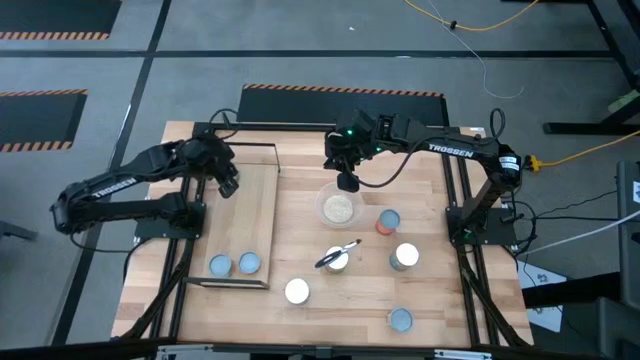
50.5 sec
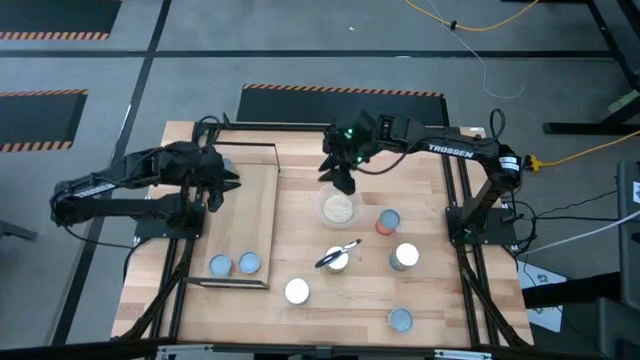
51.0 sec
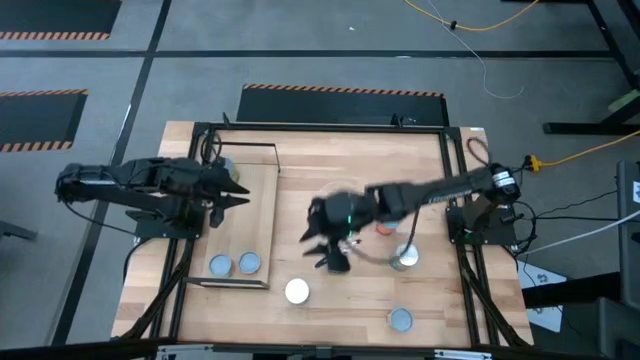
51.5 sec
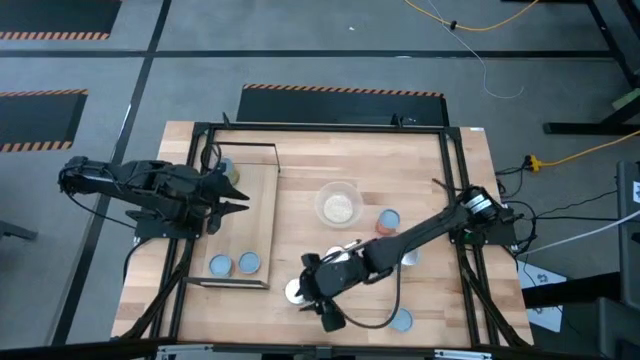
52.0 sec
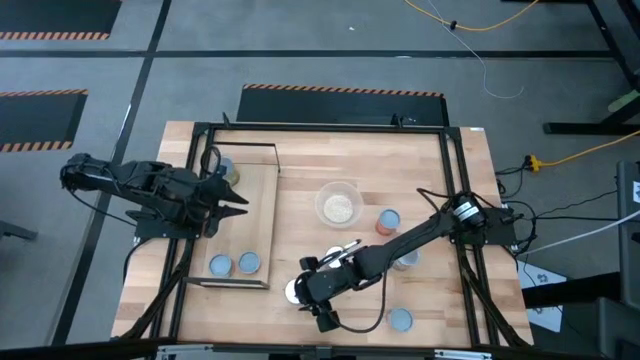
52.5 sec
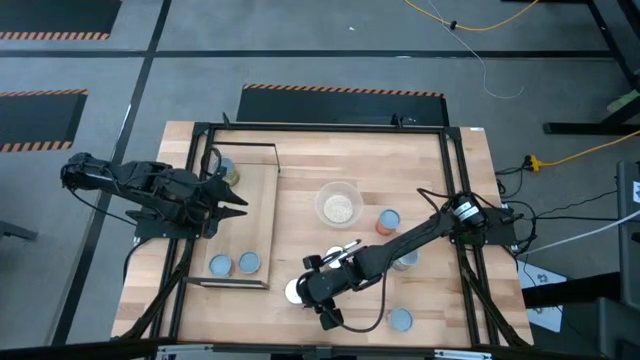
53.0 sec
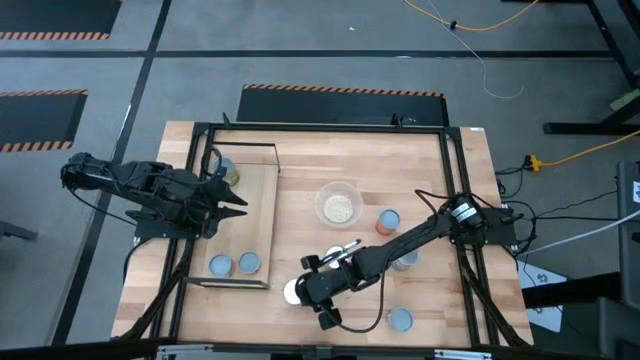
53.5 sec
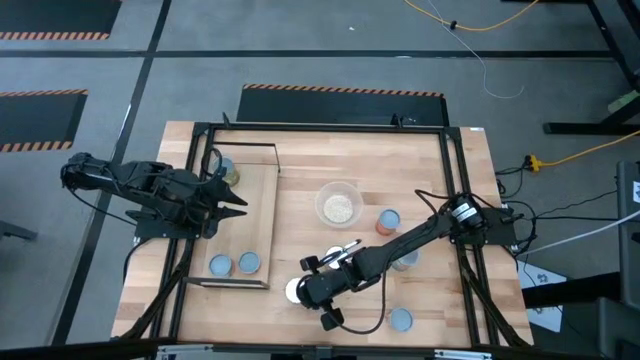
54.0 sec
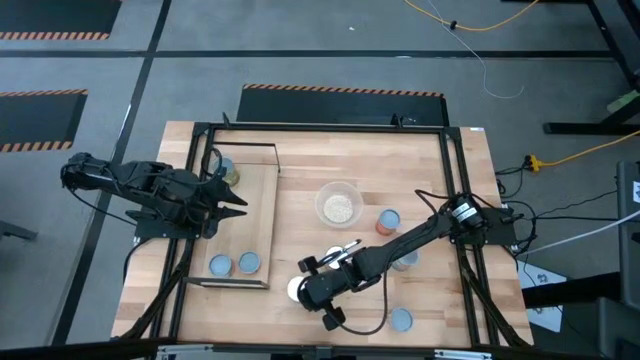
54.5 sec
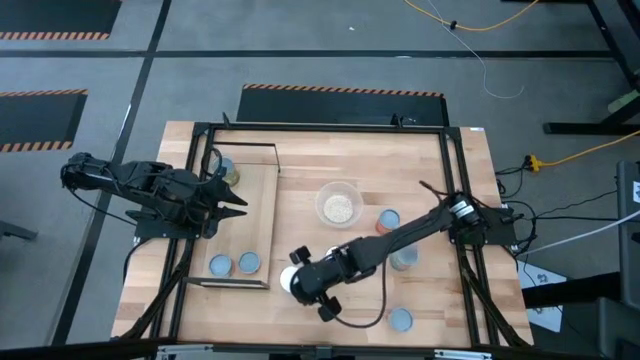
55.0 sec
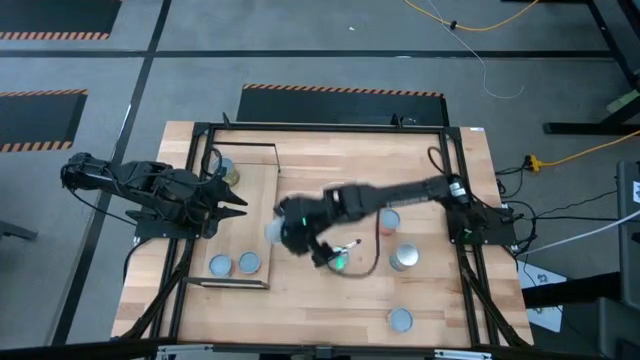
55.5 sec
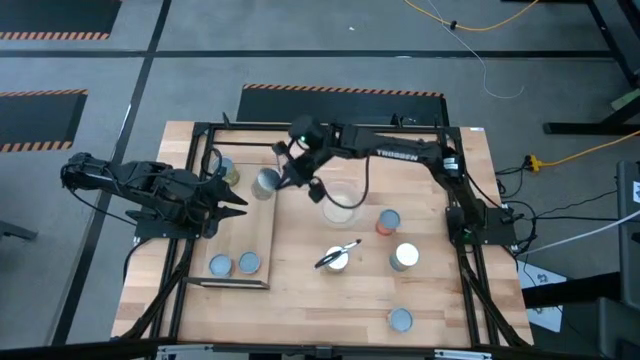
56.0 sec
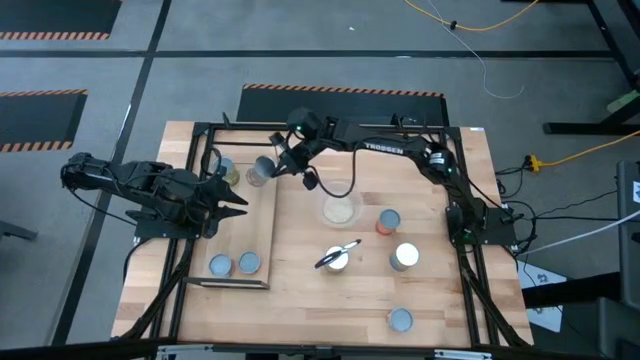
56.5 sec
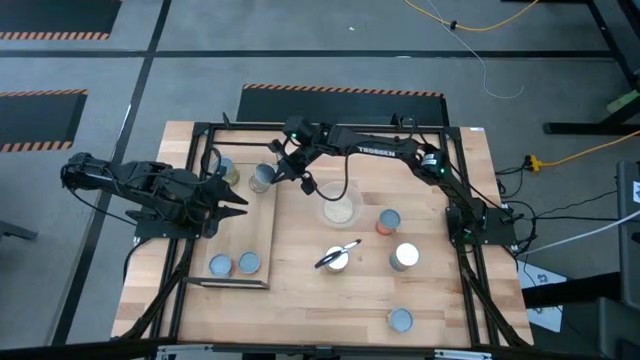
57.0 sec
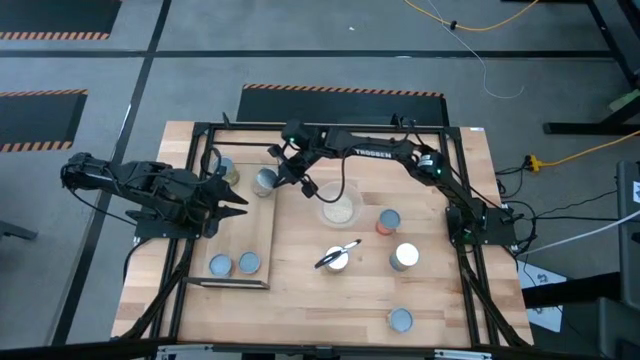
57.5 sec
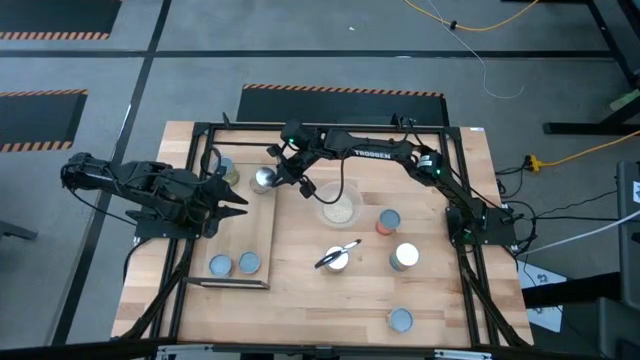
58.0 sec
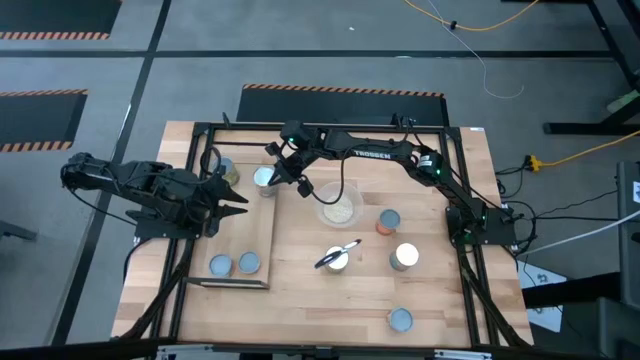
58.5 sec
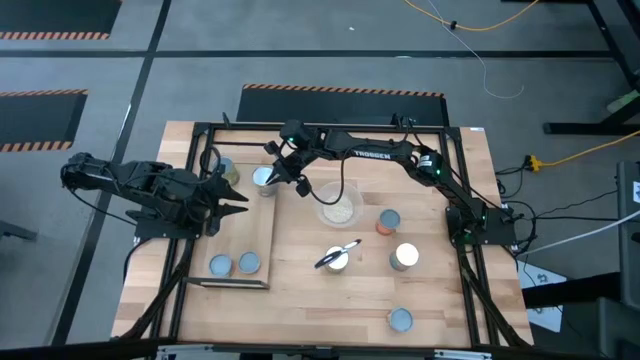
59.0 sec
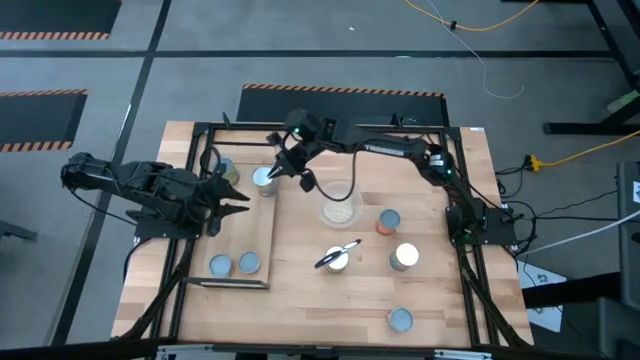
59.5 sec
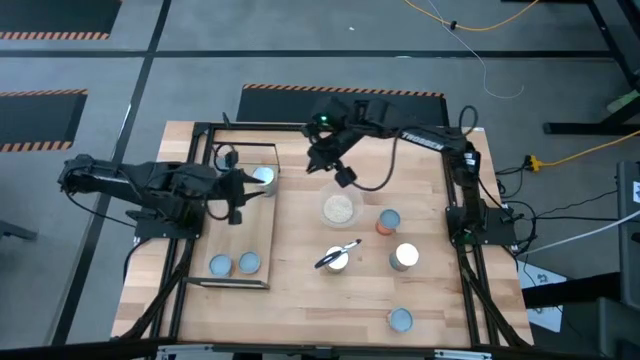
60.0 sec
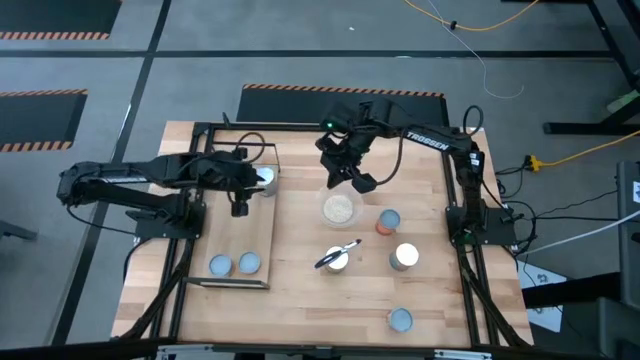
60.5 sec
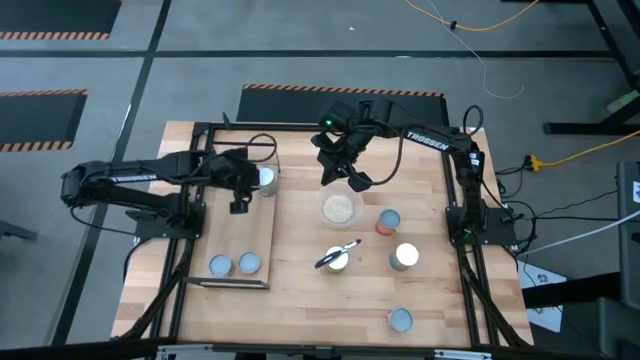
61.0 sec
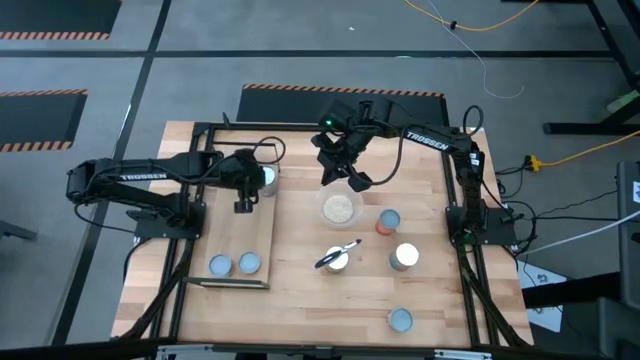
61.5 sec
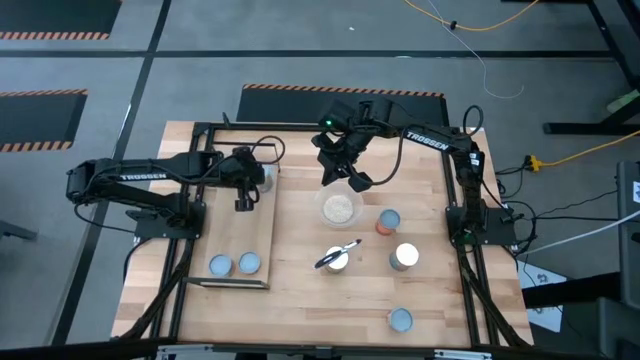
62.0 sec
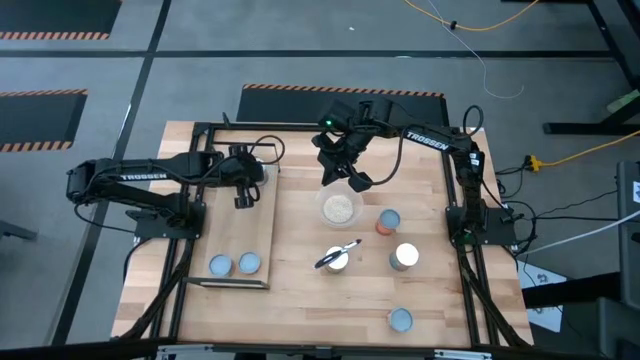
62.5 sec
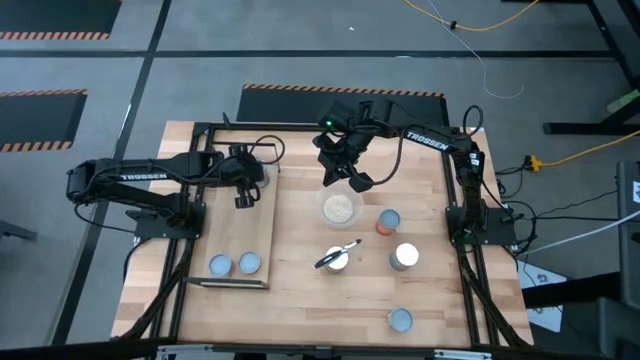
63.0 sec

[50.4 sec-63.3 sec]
Task: Pick and place cans onto a shelf
Put the canned peaches on the shelf

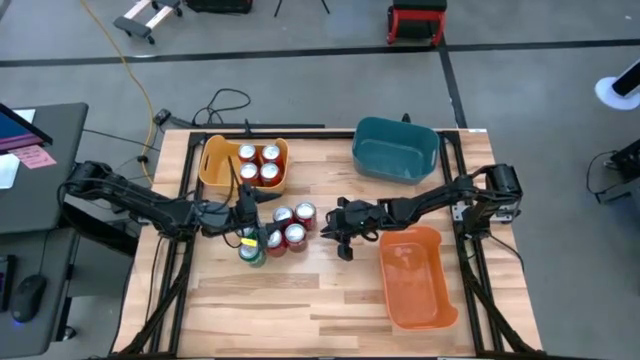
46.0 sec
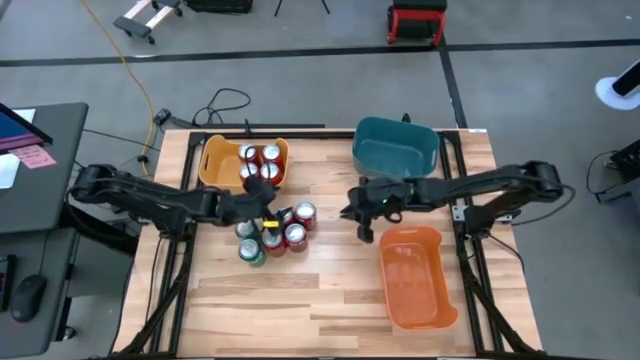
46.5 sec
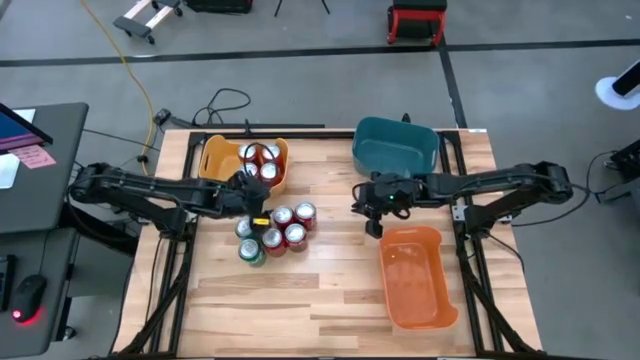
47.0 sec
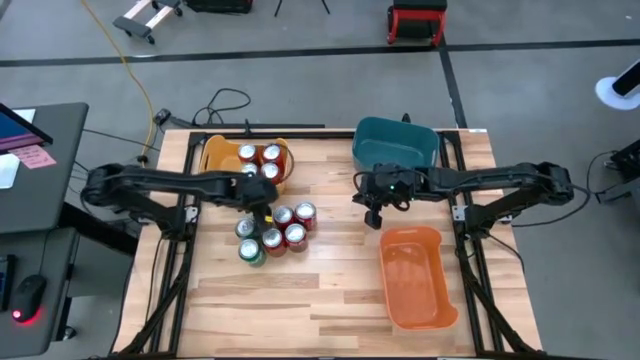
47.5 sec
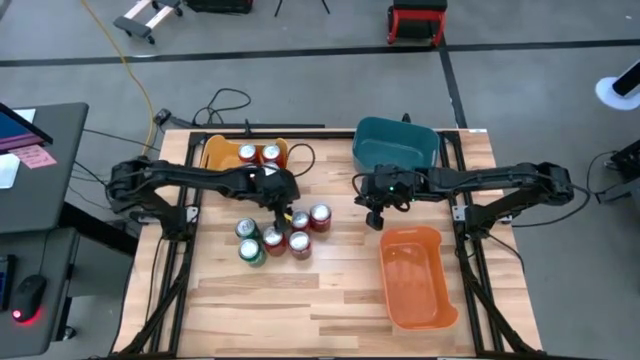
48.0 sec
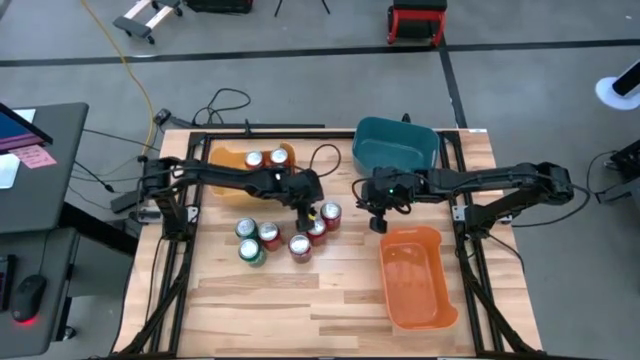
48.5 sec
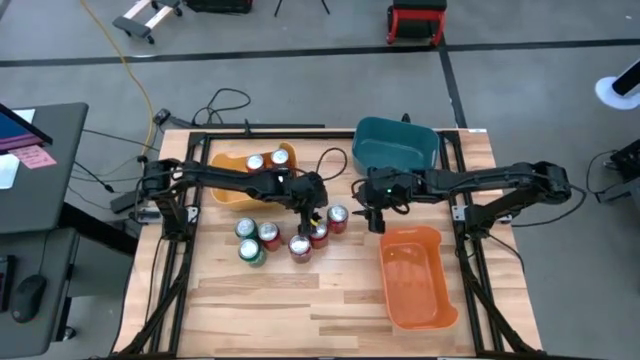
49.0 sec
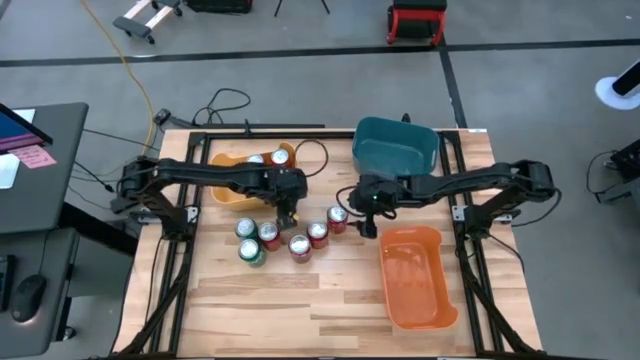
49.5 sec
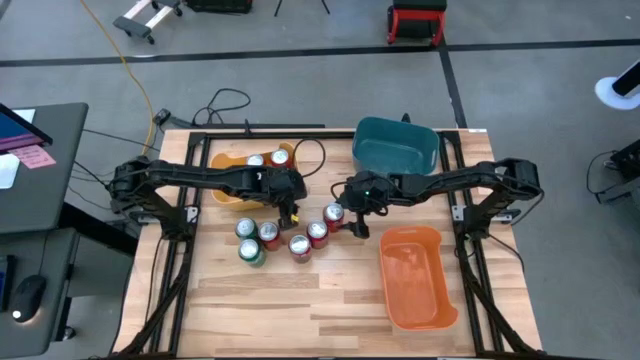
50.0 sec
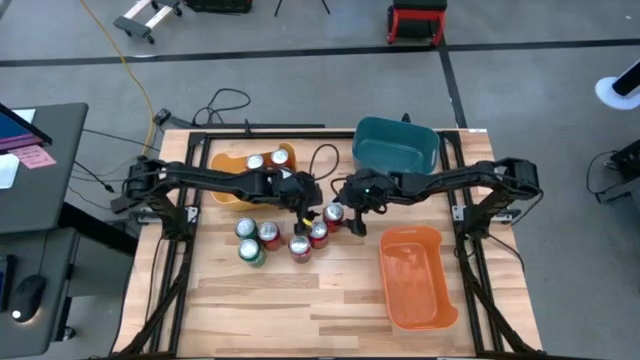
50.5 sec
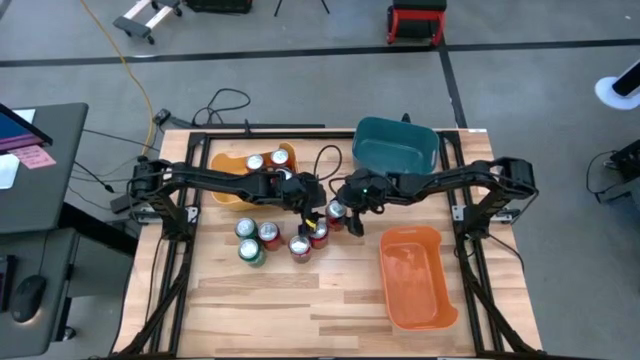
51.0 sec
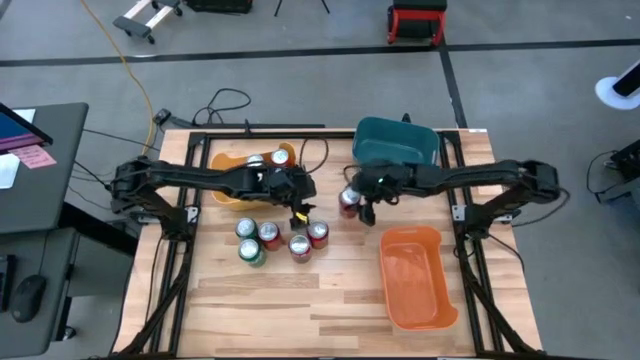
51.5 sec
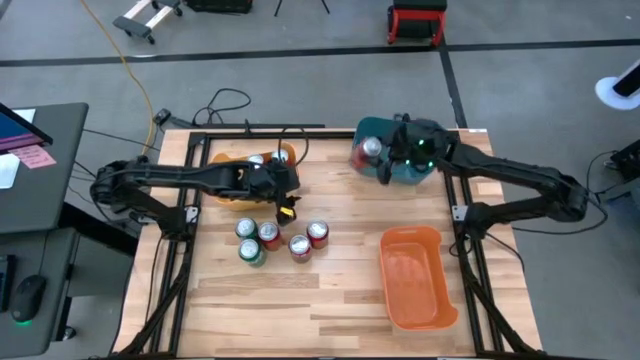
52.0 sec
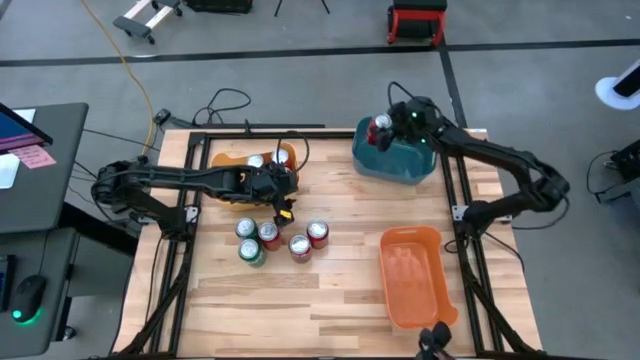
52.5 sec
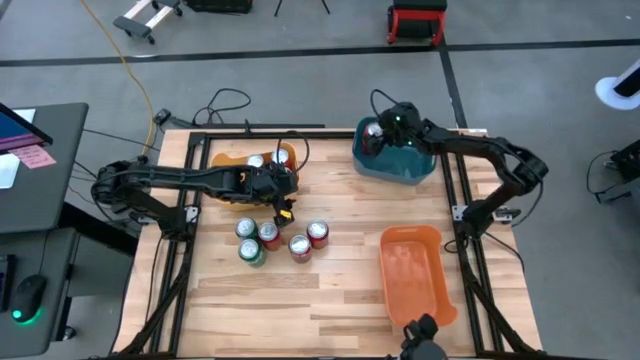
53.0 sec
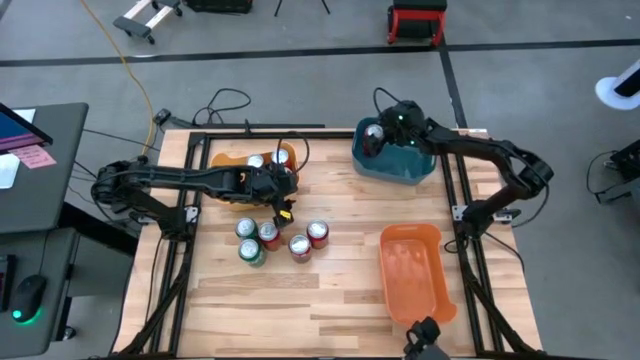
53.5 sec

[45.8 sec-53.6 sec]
Task: Sort soda cans
Put the top right red soda can into the blue bin
